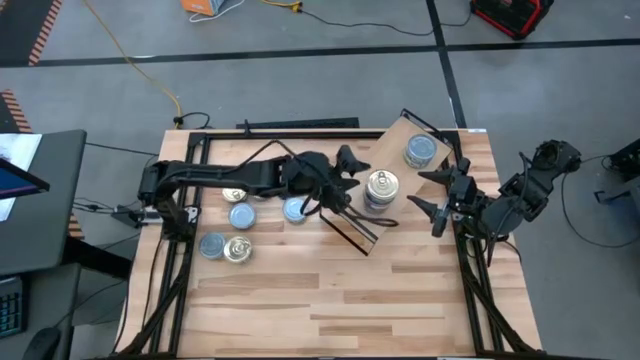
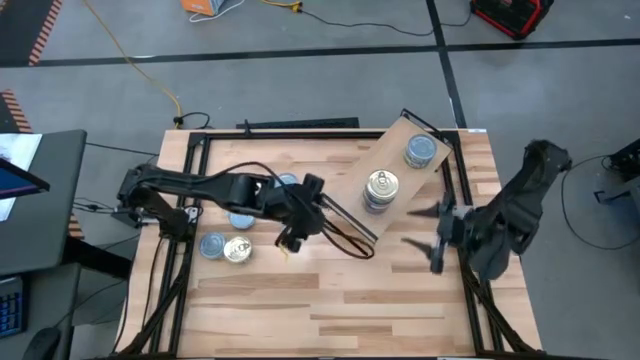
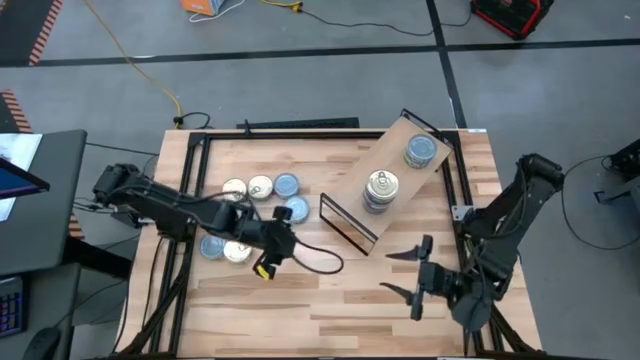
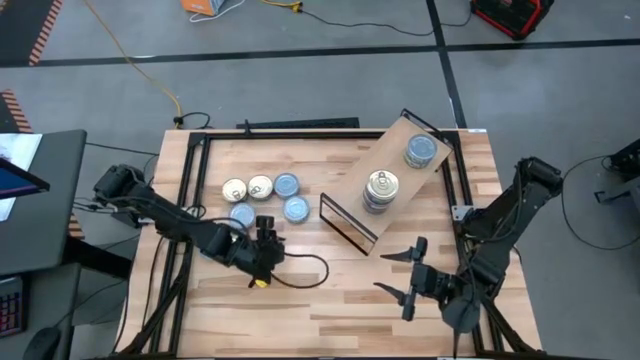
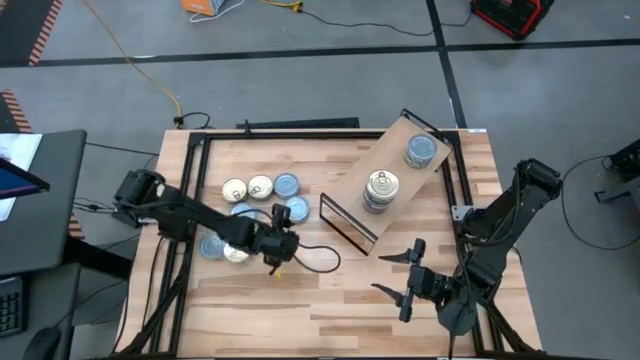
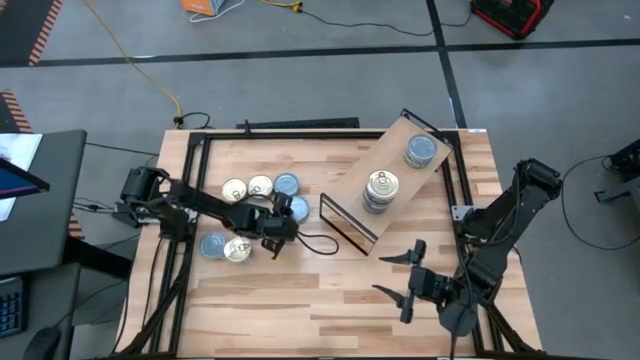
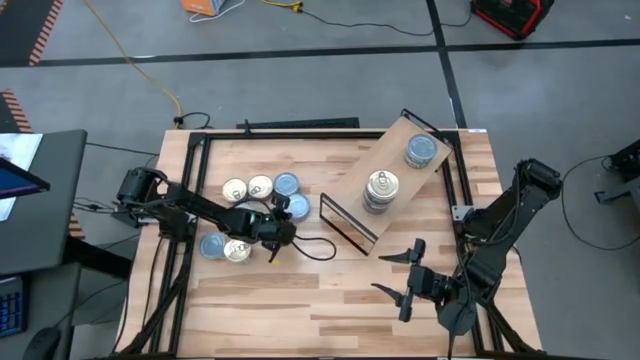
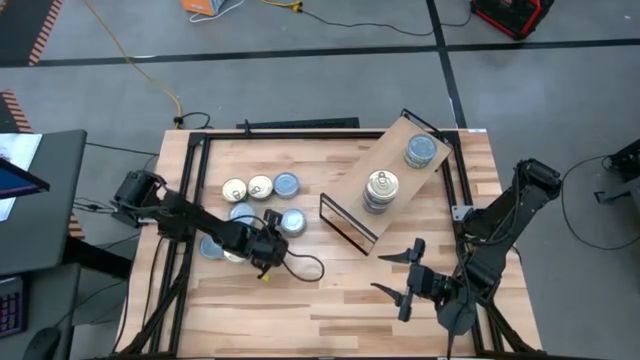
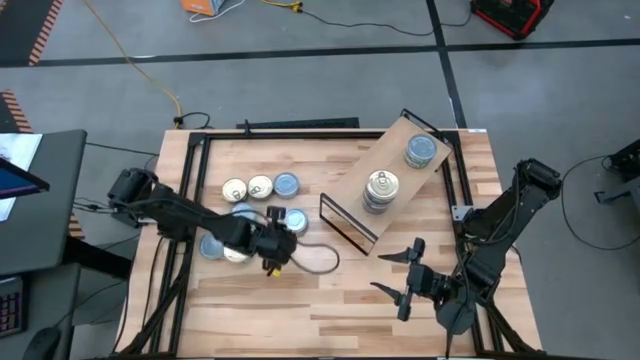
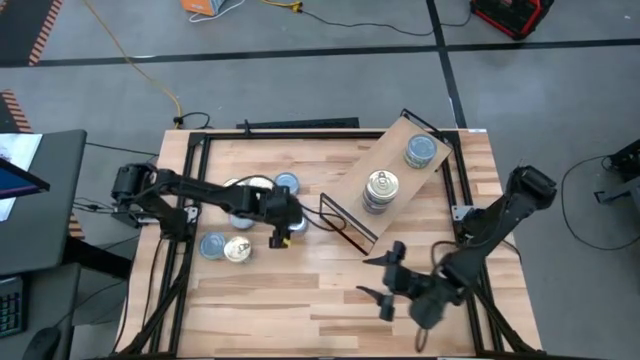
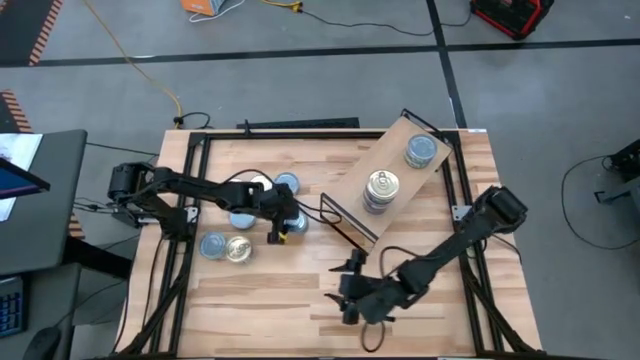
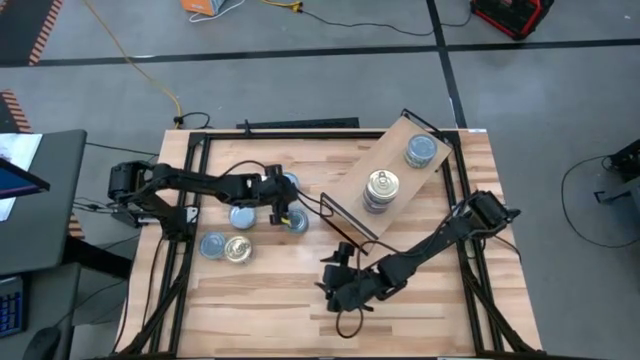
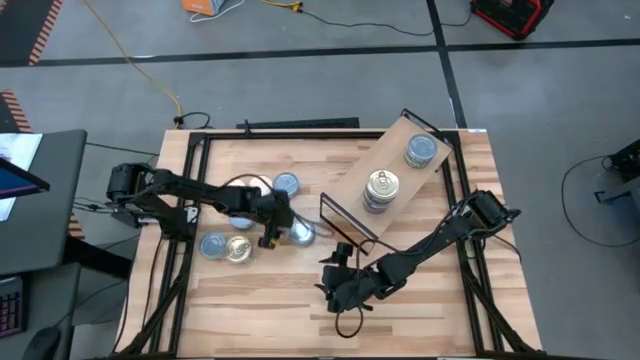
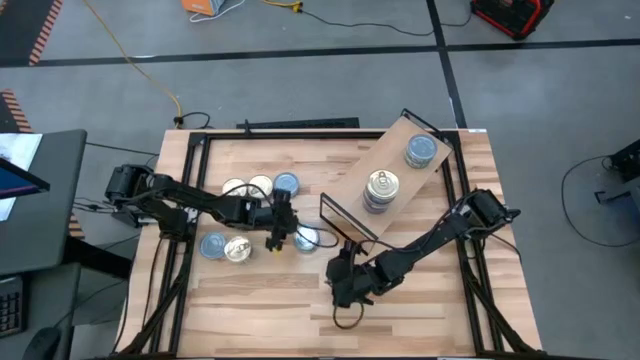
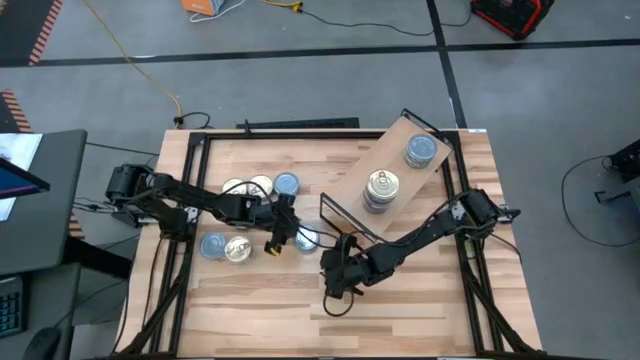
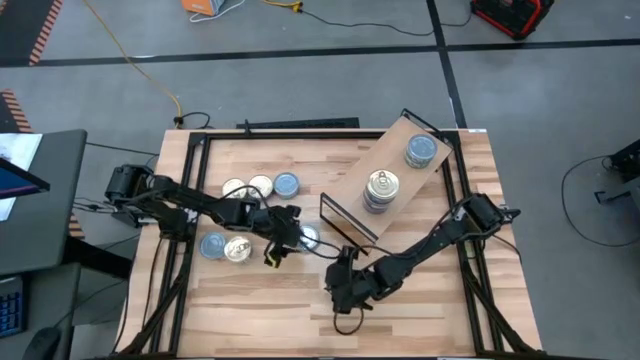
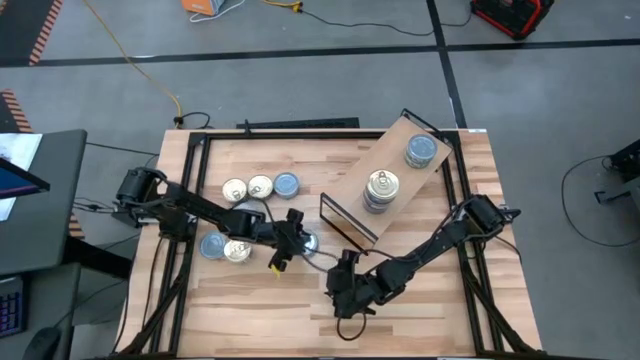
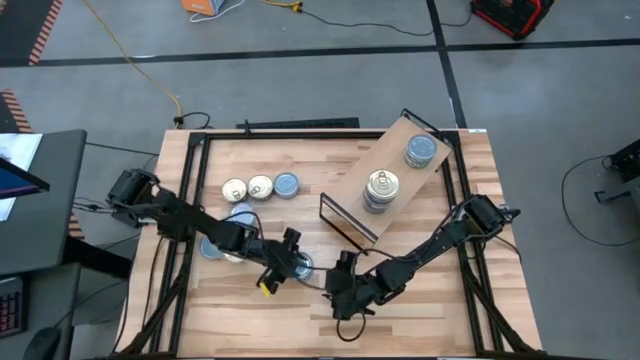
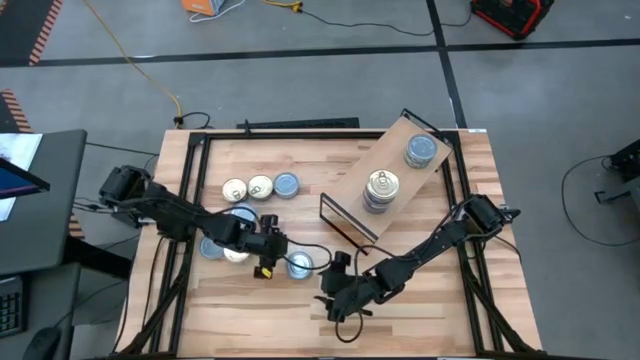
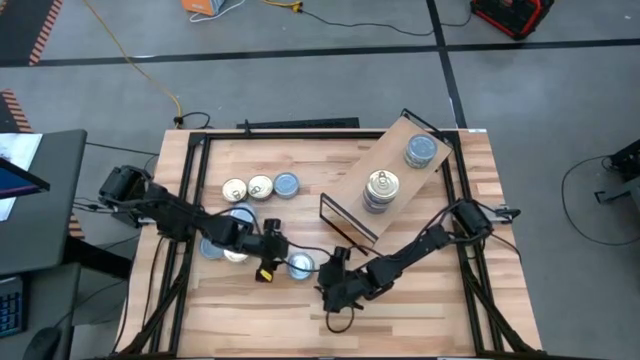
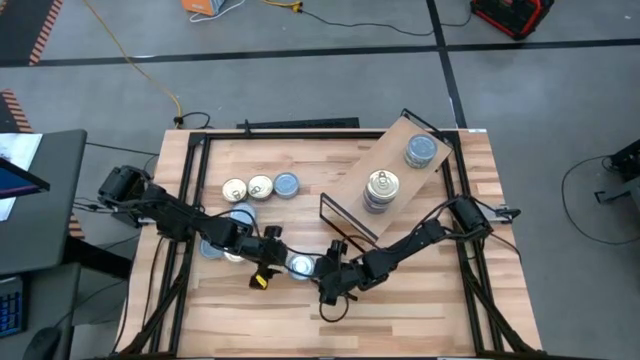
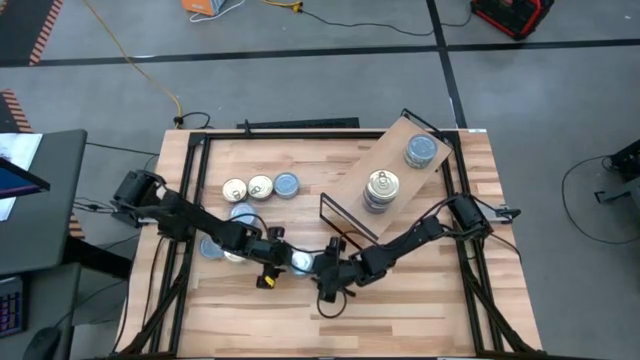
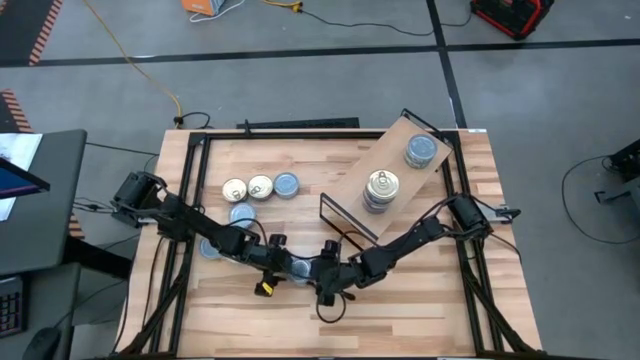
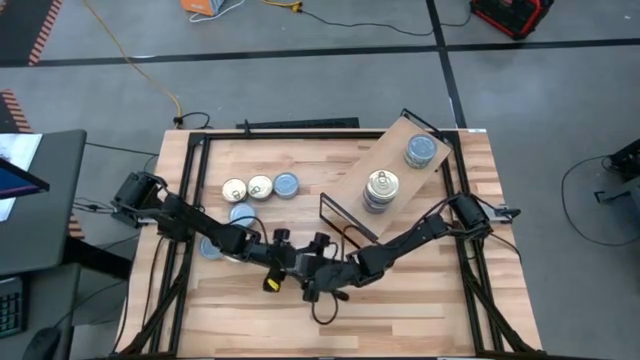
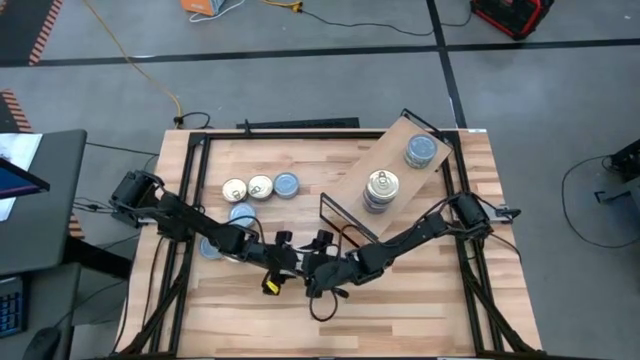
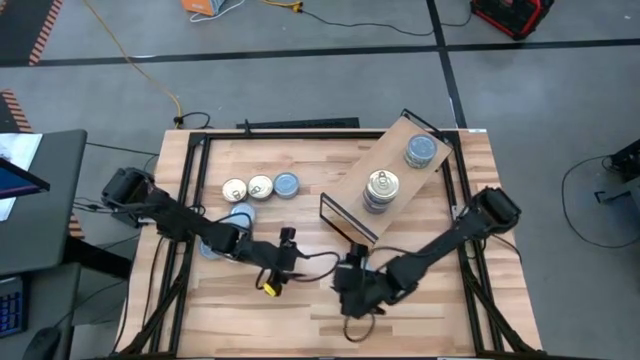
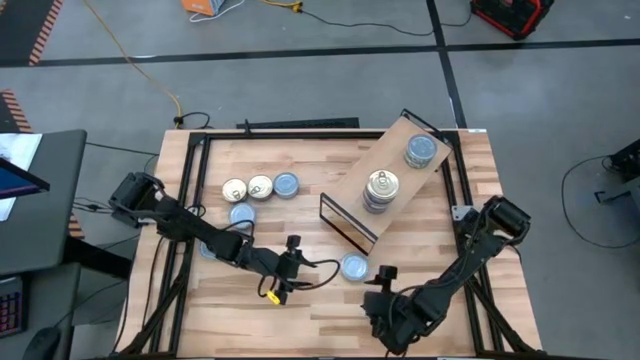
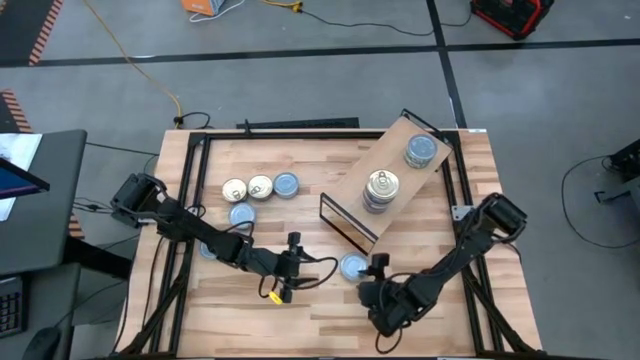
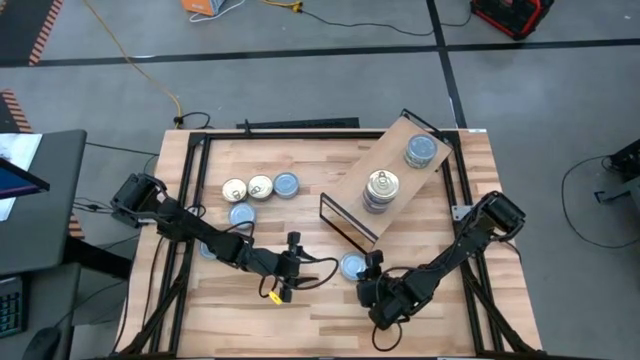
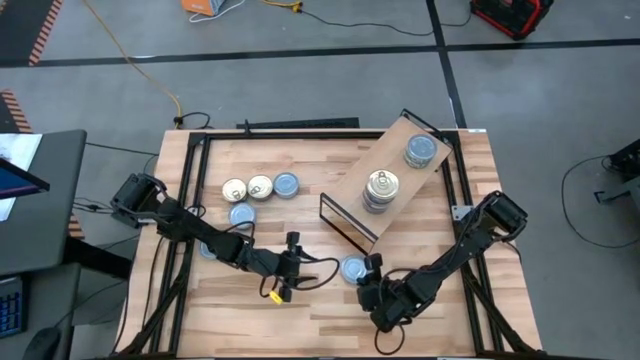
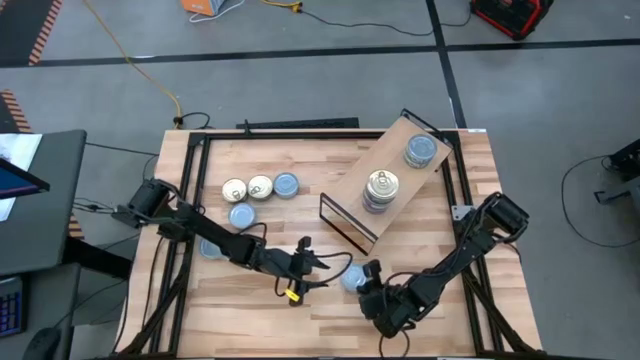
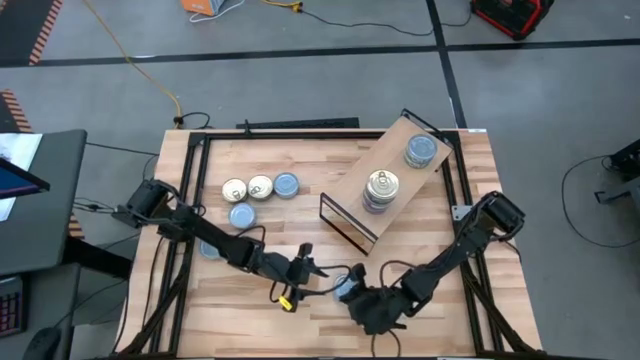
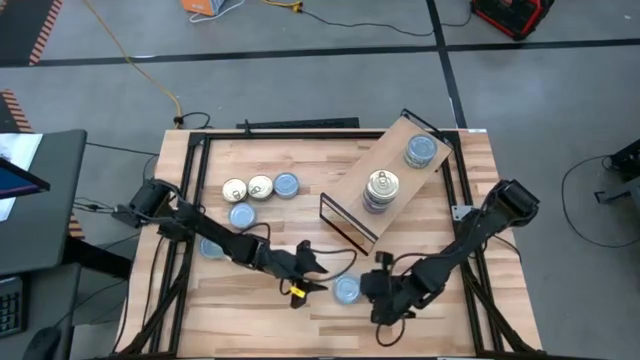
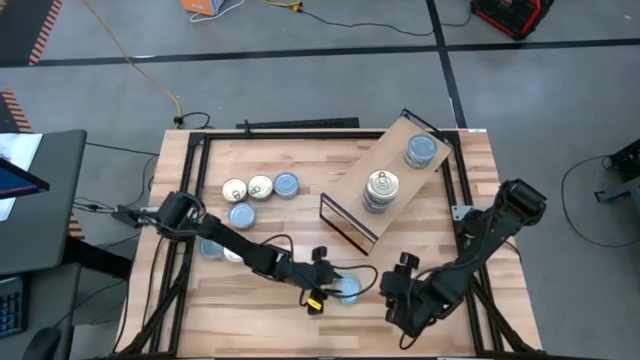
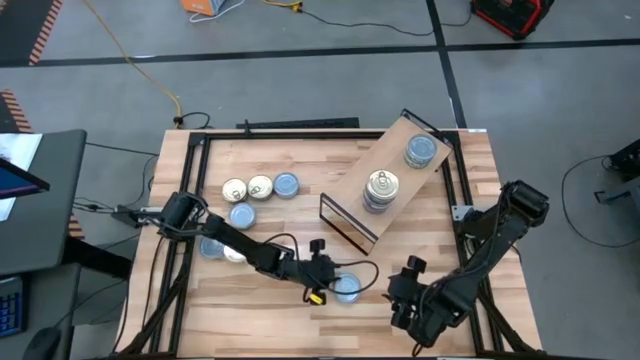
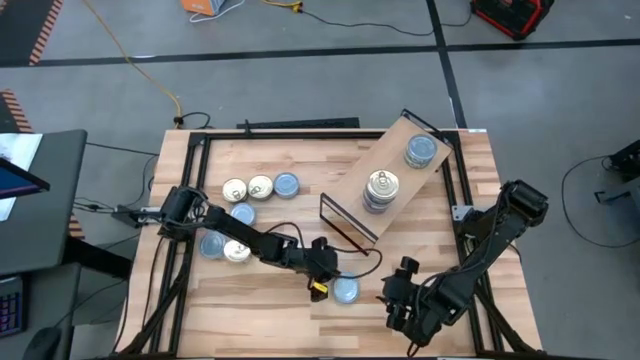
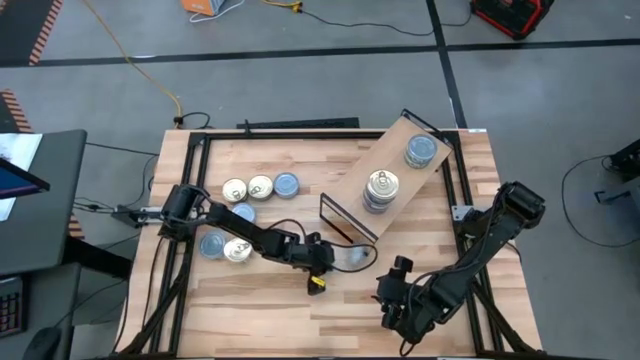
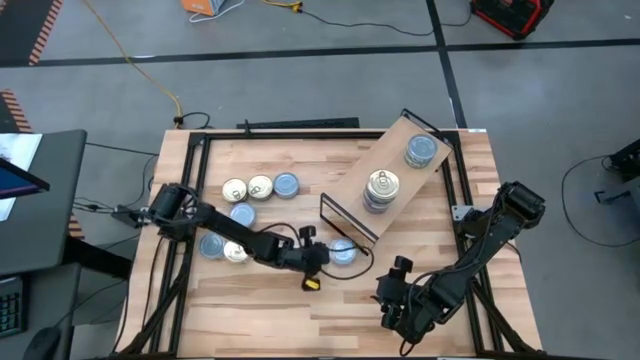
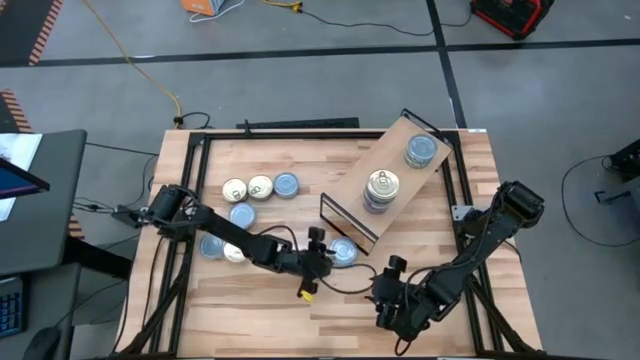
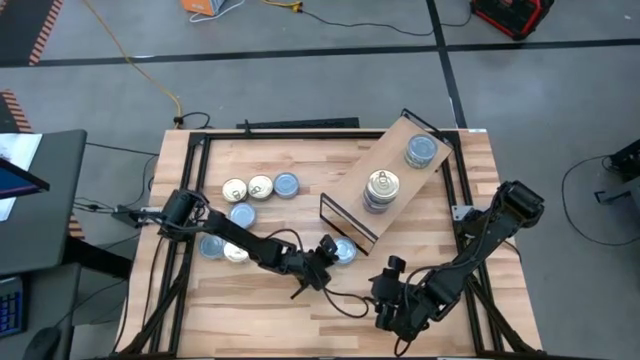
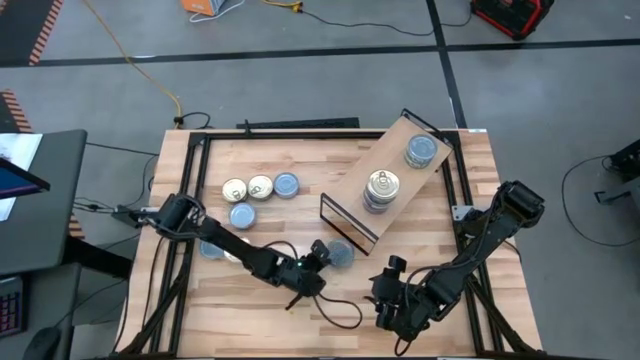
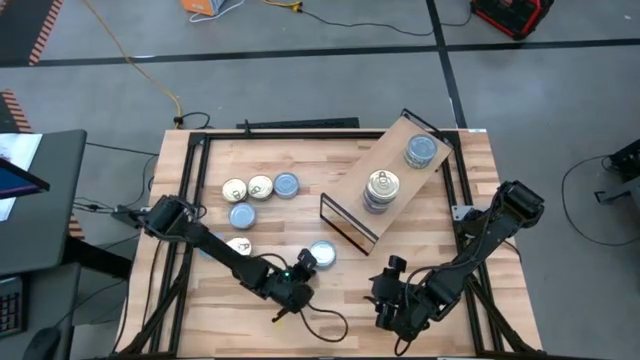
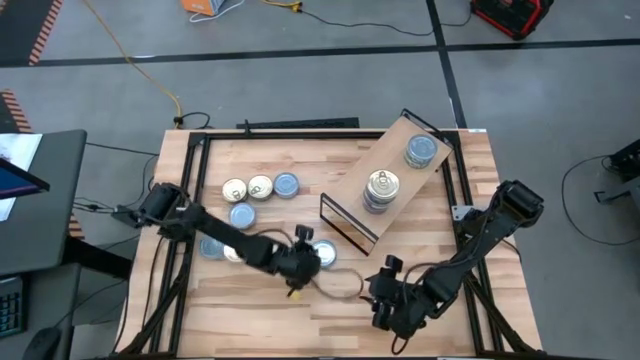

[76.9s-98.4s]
Task: Stack canned seafood by type on shelf
Stack the green tuna can on the shelf
